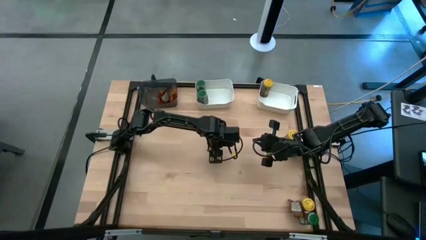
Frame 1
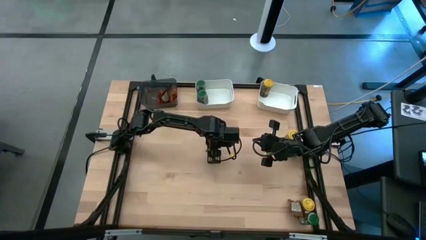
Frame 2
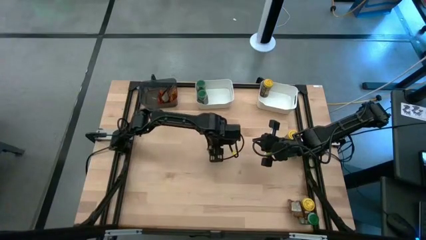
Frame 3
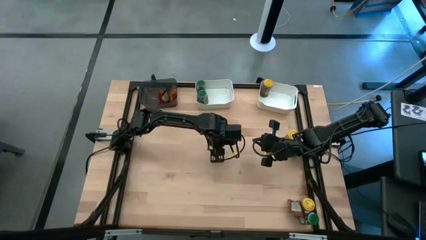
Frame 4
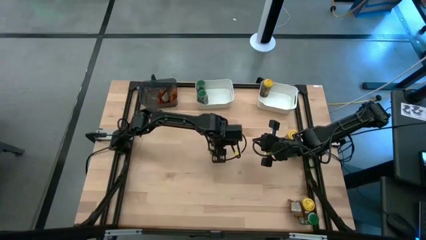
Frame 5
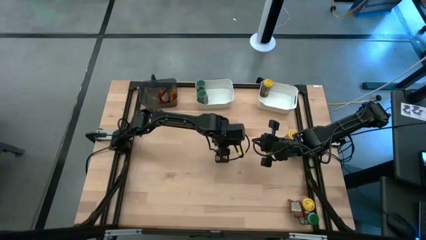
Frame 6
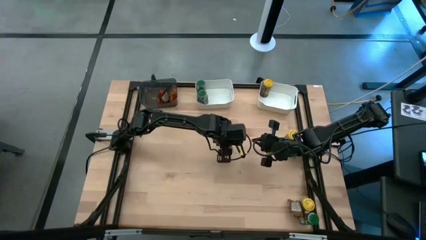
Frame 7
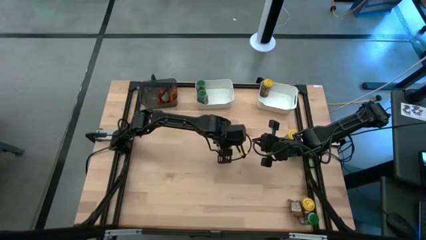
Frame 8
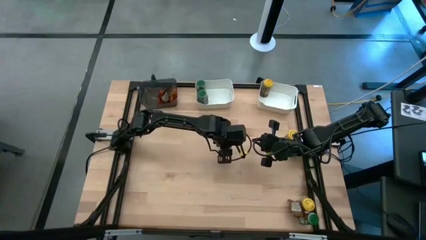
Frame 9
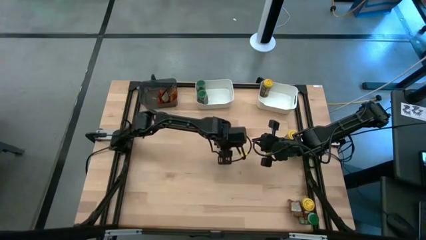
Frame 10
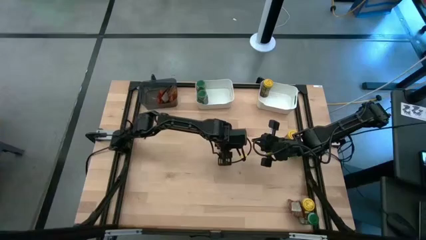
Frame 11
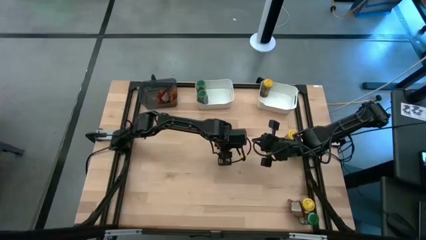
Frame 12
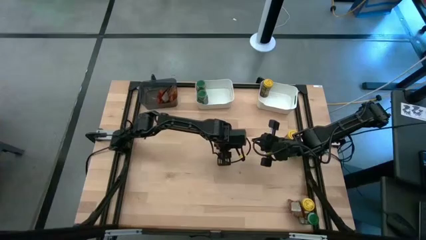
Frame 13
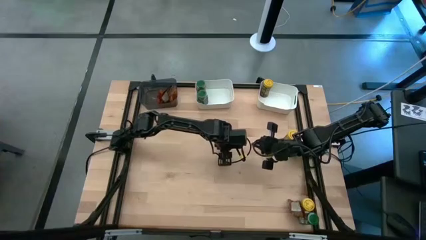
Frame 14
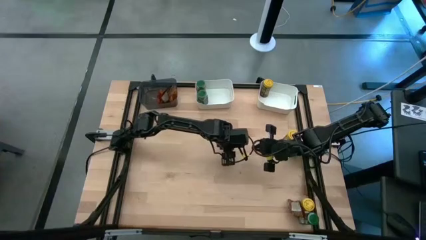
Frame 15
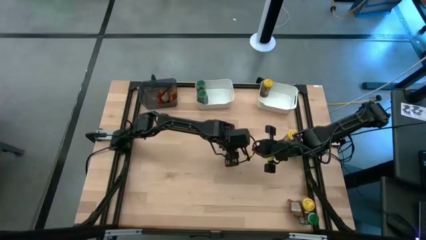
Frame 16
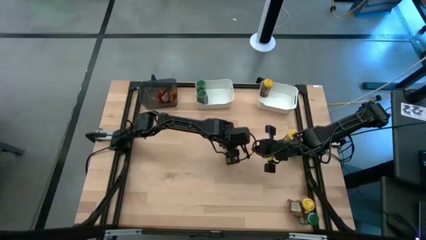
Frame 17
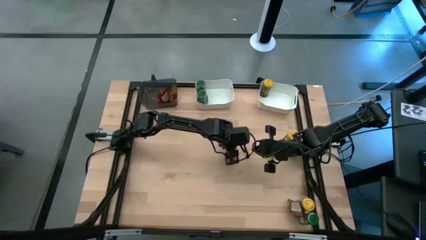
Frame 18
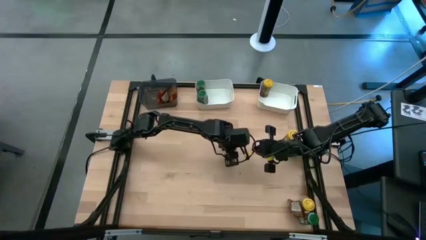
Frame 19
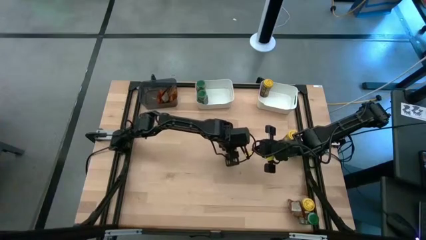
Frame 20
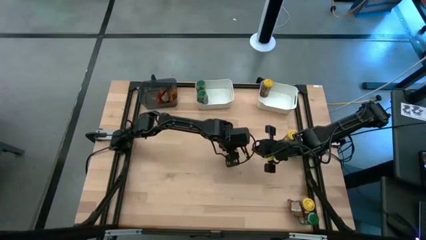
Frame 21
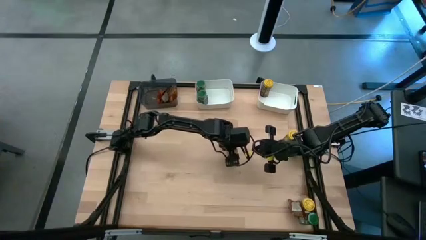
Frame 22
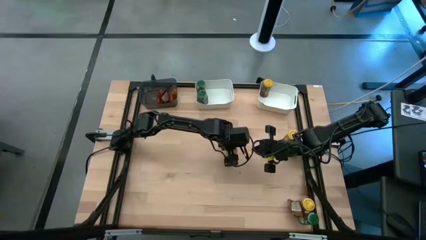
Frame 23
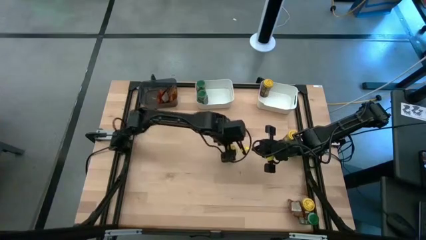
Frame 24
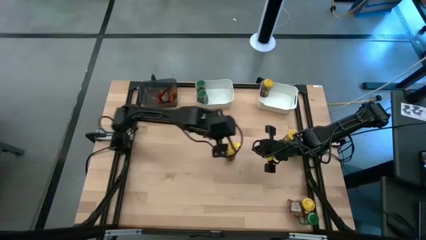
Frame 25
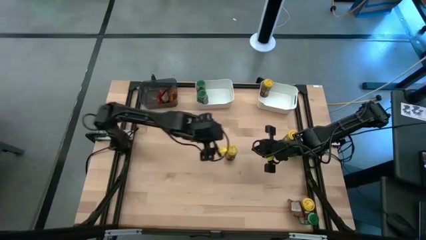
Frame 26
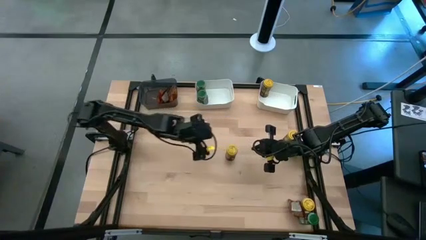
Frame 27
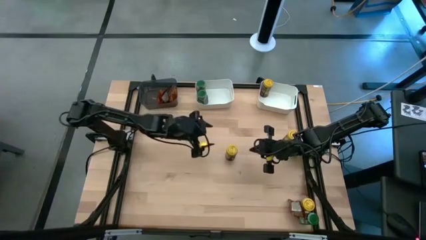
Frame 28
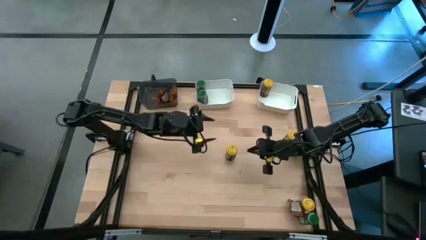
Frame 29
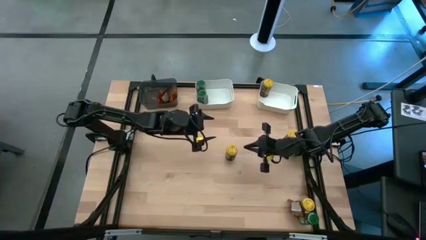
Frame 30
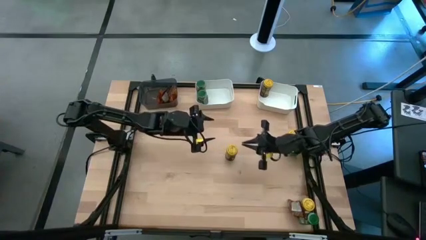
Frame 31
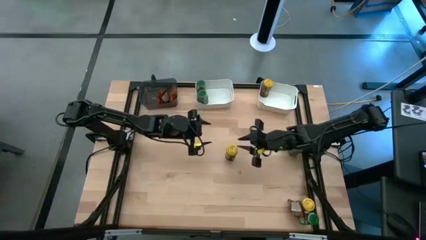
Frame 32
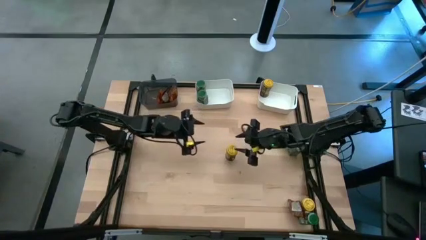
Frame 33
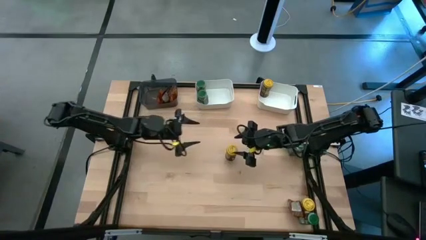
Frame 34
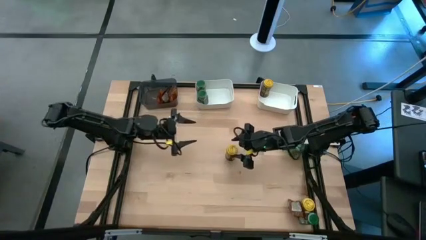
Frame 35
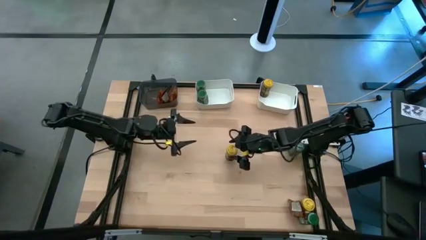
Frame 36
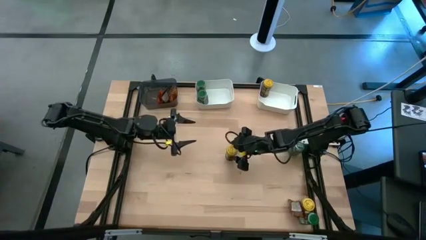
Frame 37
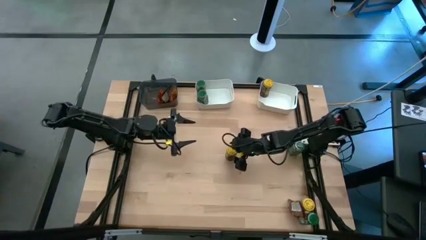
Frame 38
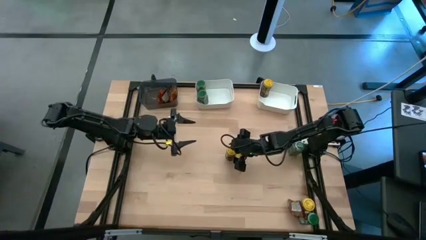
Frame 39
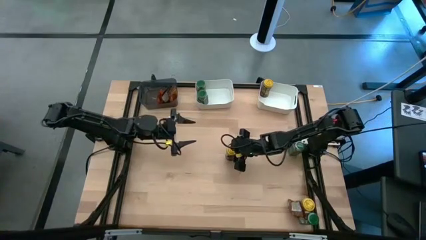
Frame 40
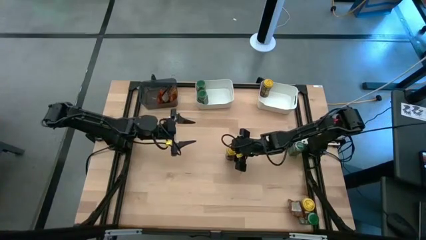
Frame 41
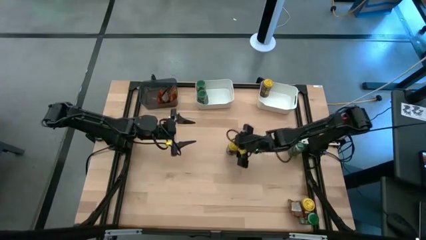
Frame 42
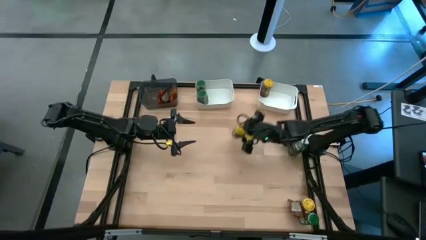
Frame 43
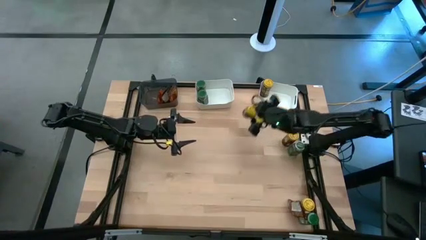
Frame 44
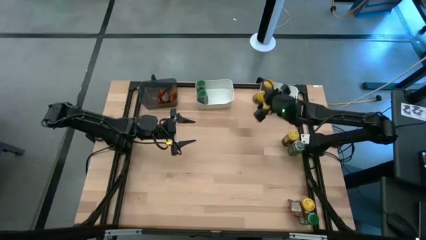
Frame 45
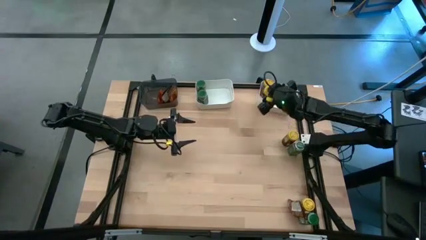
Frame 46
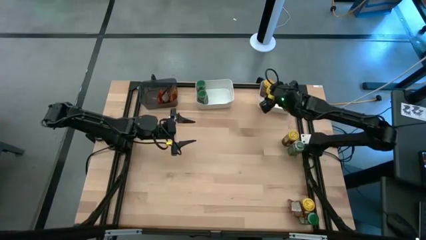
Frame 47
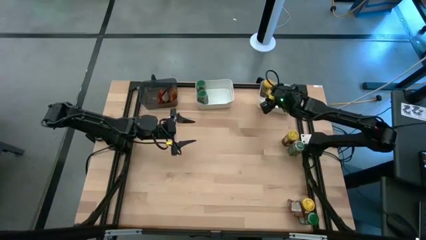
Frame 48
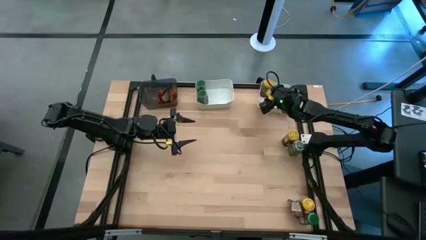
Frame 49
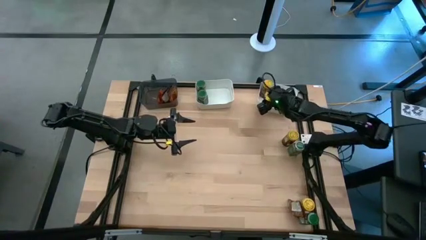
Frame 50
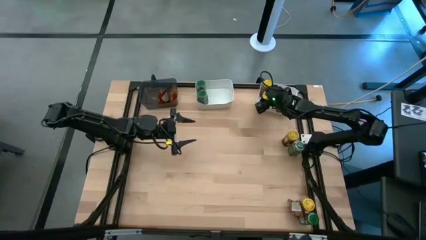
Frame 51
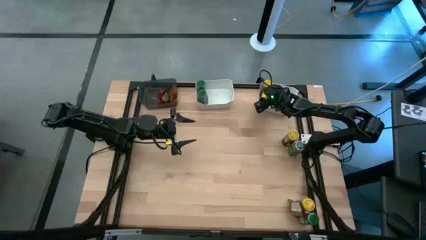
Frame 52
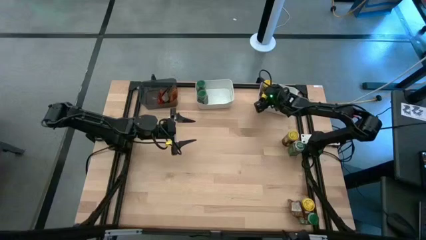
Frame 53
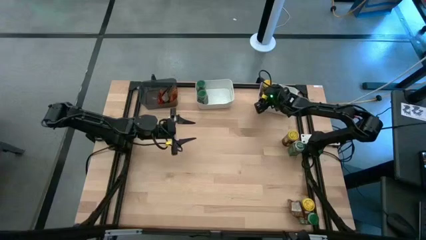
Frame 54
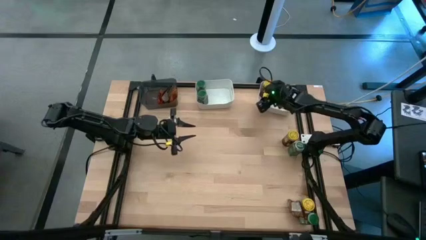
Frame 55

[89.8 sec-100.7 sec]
Task: Sort spices by type
Put the bottom left yellow seasoning bottle into the right white bin

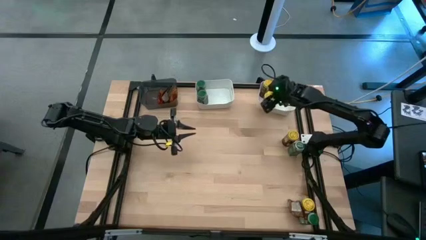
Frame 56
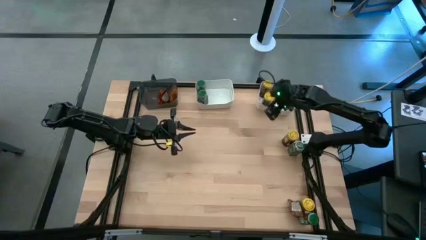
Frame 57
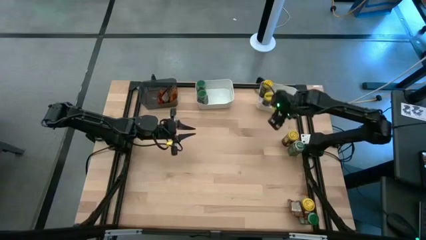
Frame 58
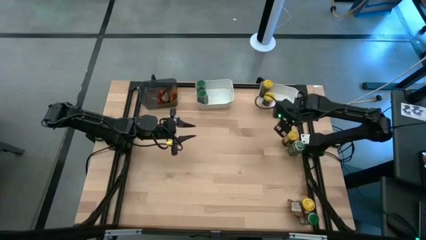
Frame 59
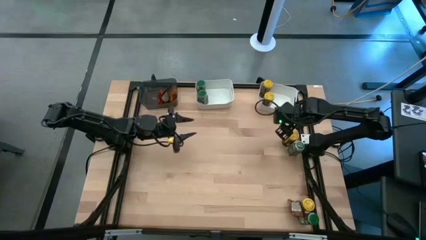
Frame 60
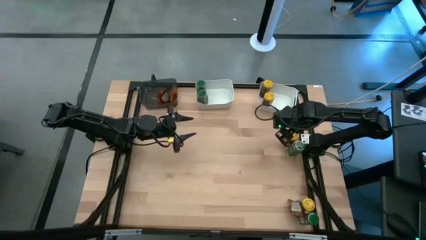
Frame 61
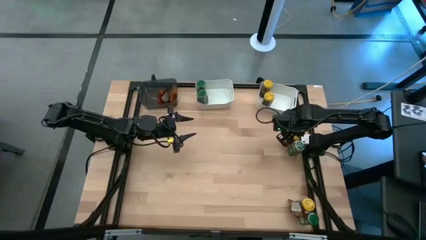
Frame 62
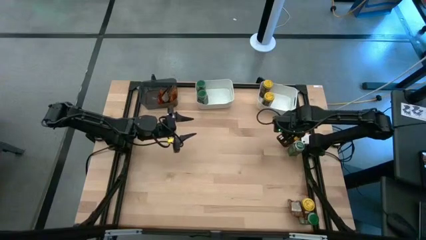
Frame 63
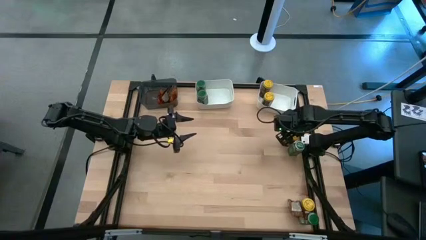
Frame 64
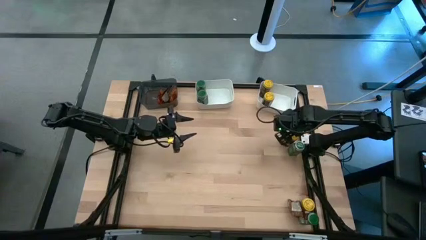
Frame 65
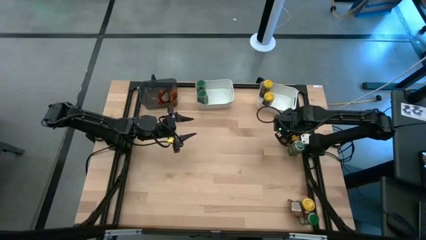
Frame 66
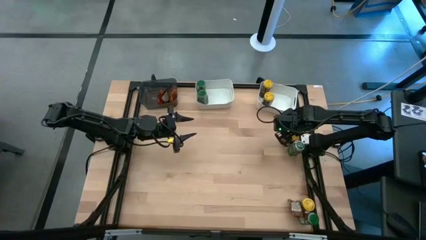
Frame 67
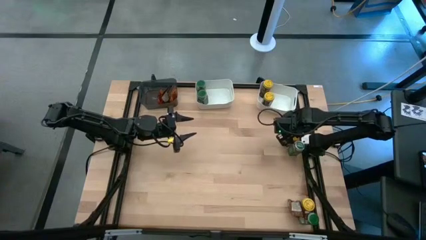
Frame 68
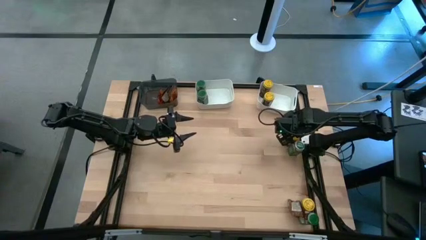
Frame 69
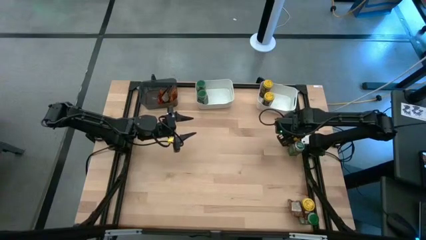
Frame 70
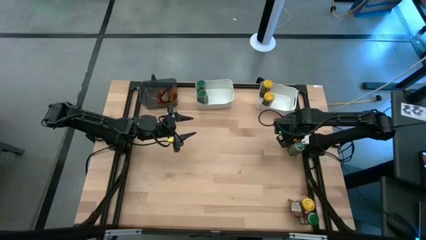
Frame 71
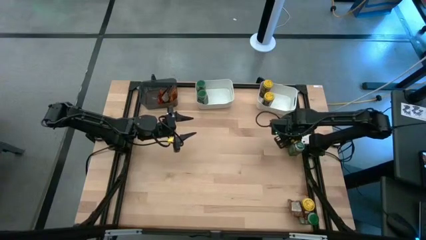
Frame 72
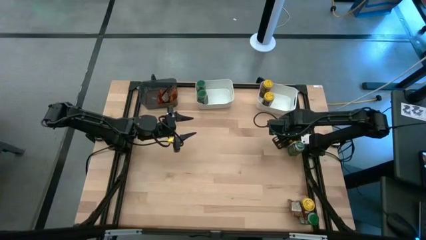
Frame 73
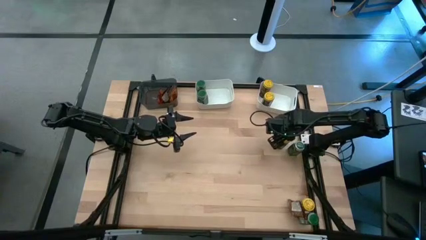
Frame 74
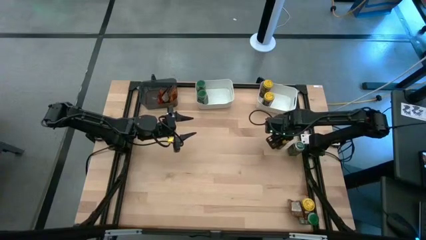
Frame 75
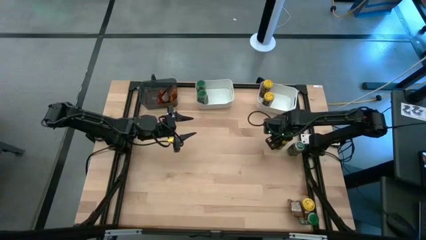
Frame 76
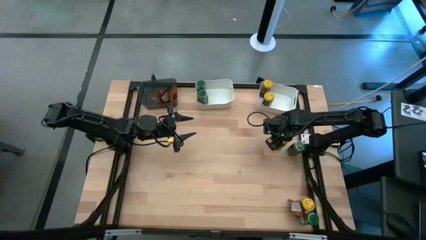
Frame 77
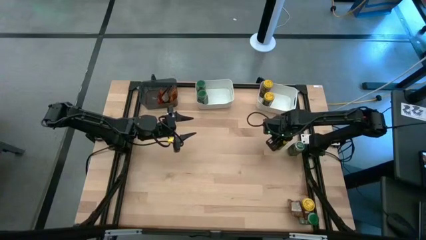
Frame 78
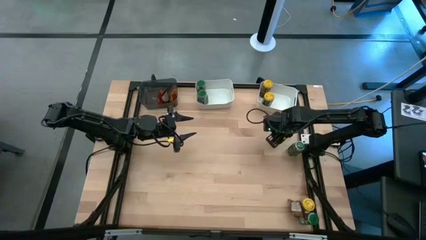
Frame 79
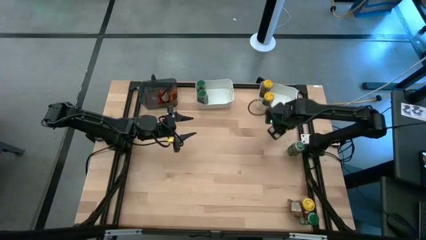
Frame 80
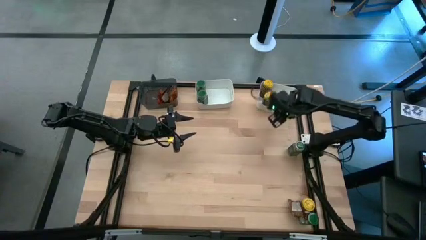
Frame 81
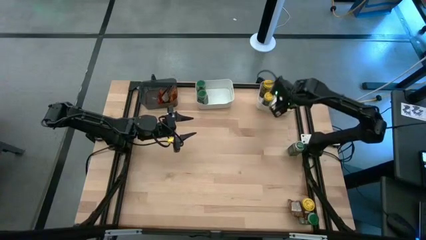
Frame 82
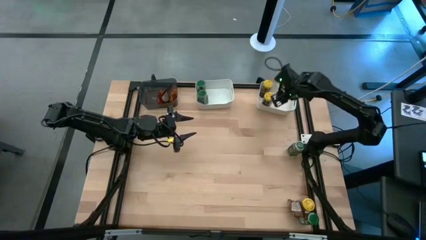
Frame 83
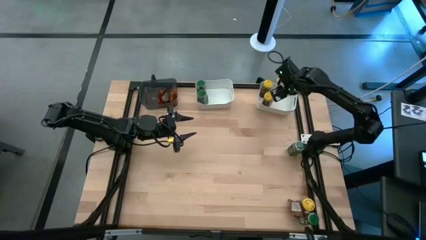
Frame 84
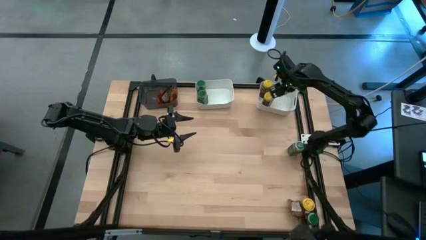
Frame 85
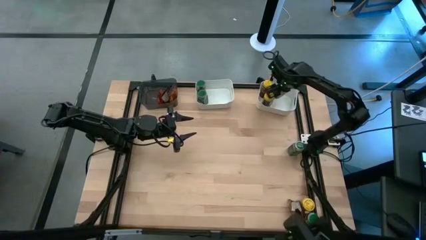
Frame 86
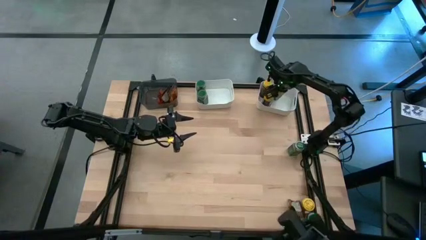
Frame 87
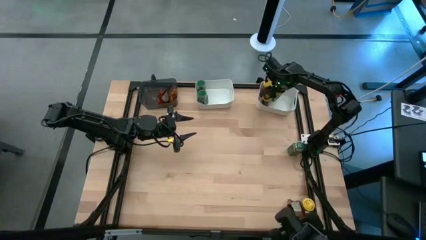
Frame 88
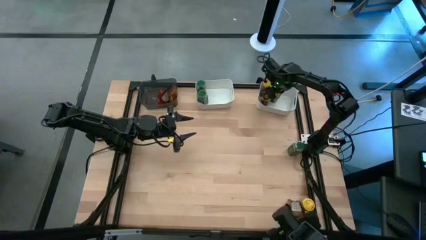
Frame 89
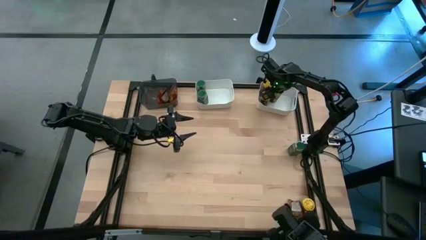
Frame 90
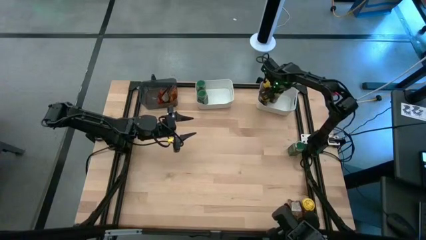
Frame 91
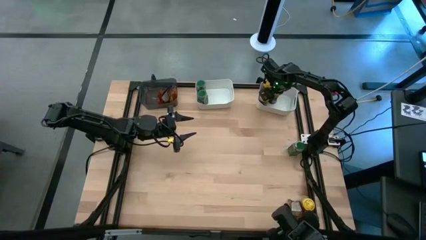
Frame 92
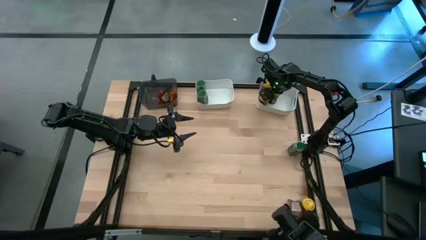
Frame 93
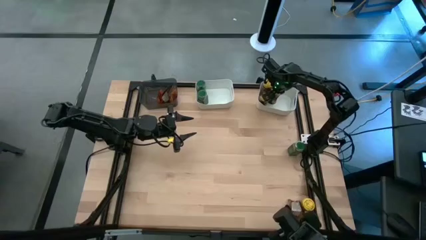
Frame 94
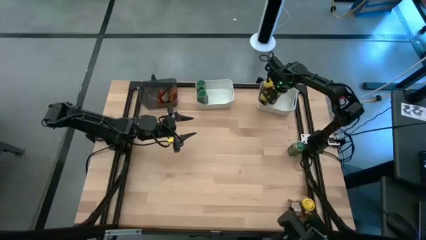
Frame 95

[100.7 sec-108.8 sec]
Put the top yellow seasoning bottle into the right white bin
